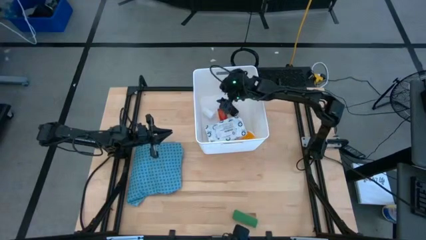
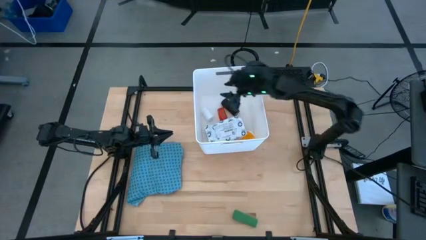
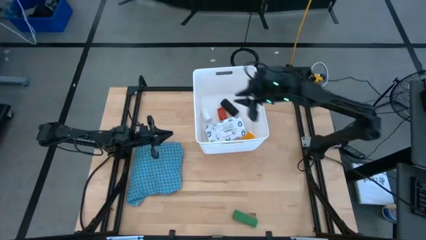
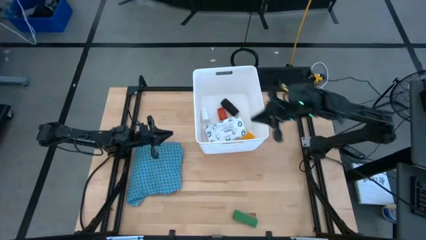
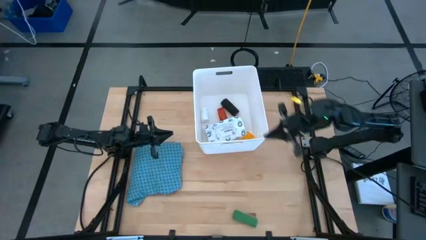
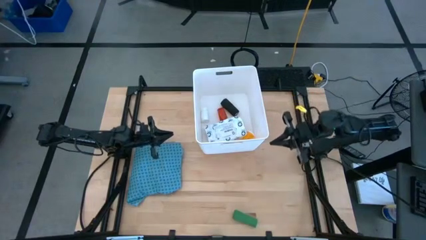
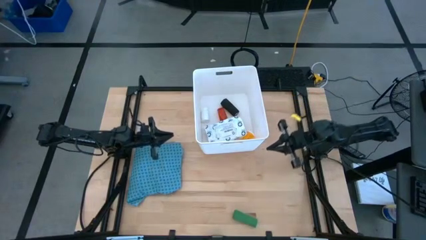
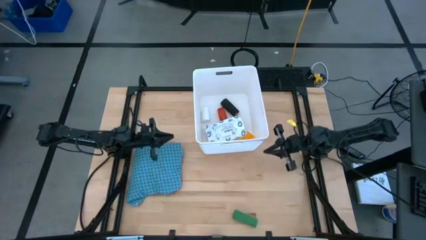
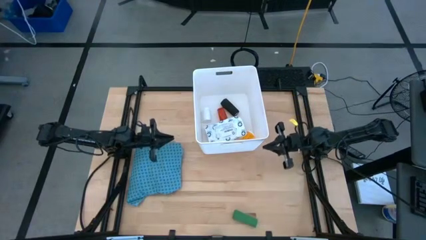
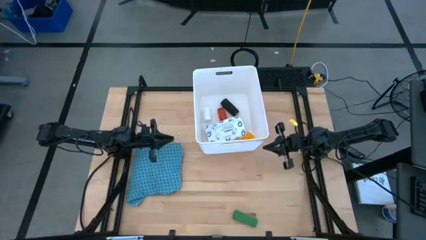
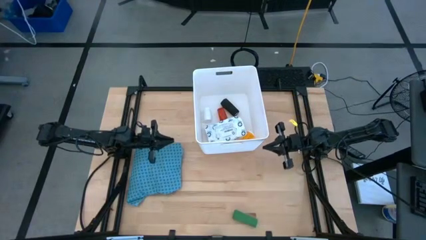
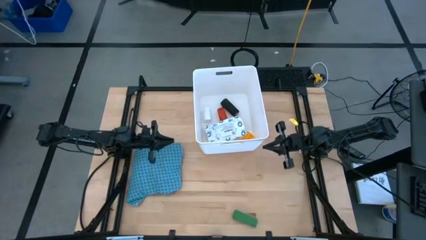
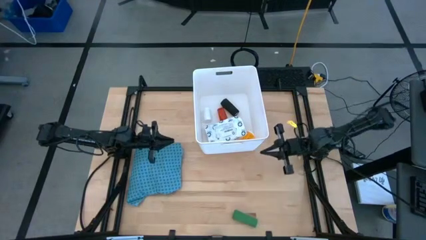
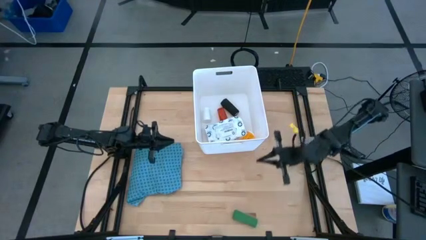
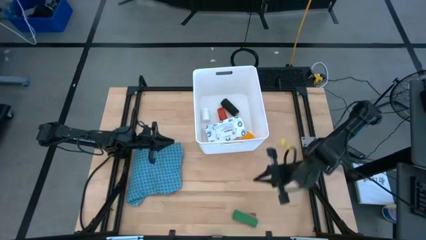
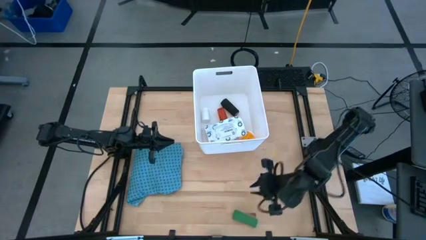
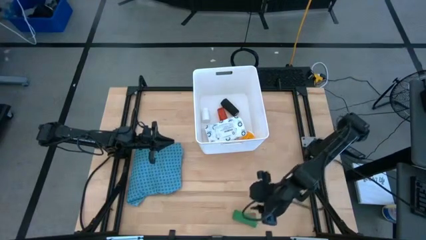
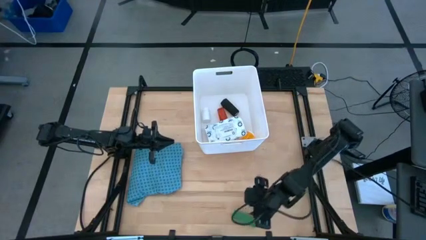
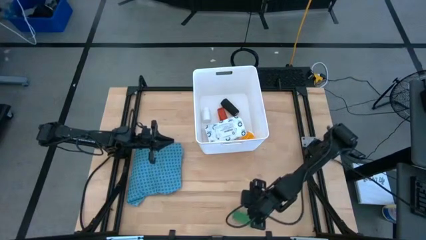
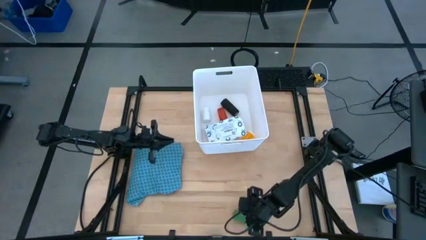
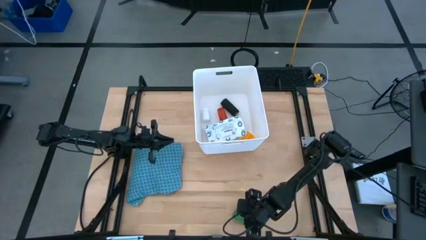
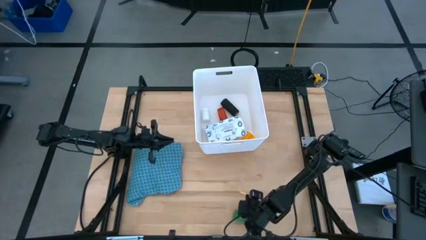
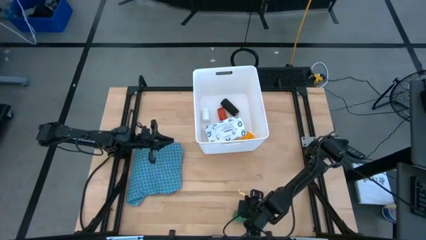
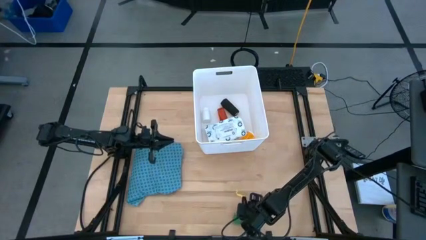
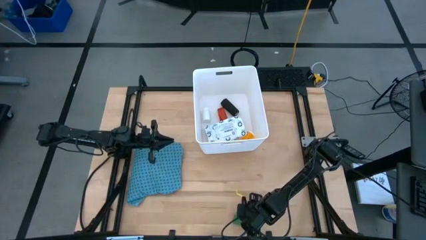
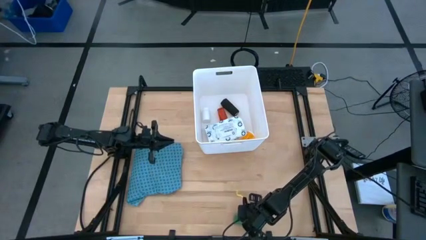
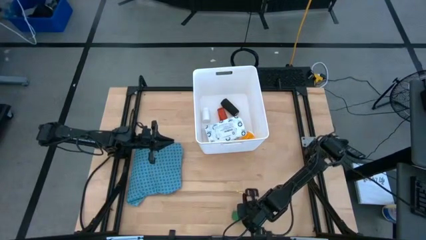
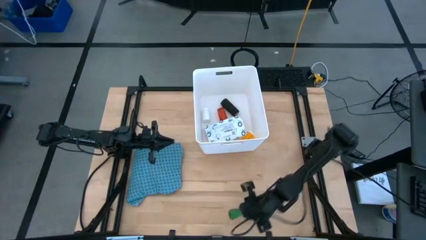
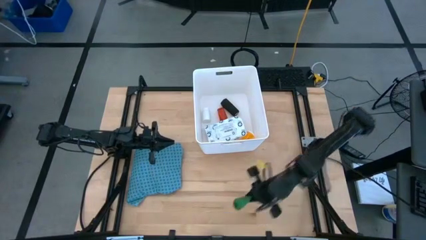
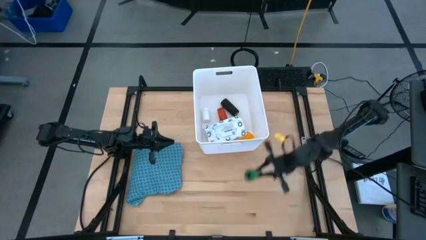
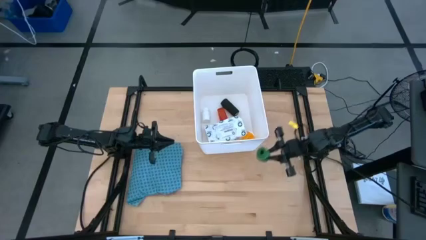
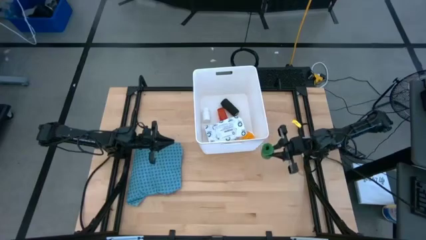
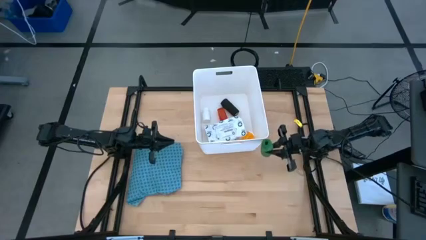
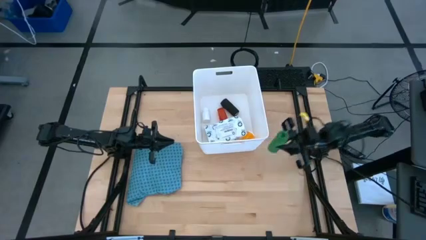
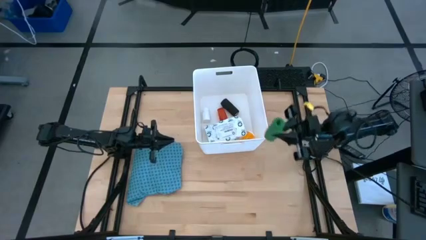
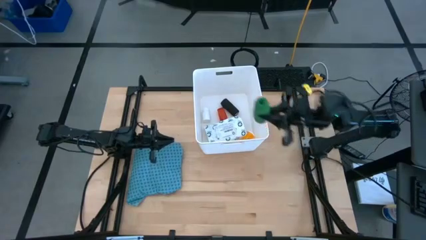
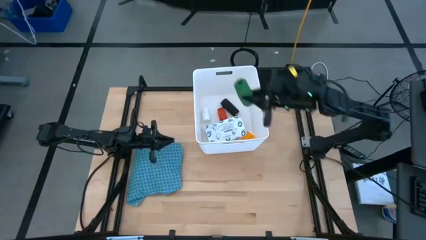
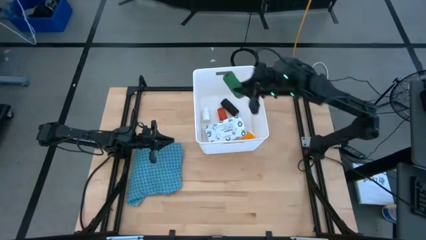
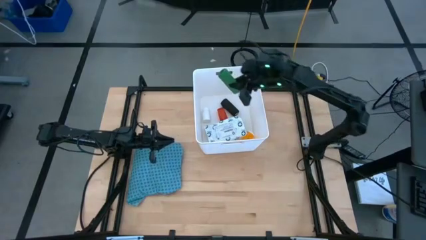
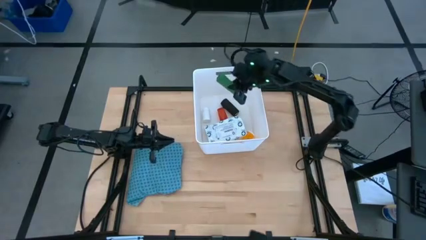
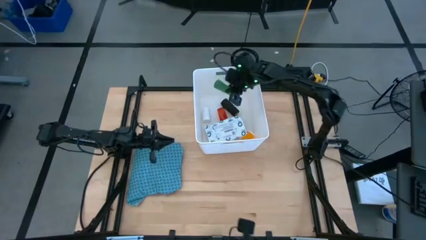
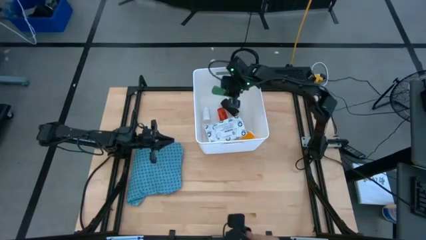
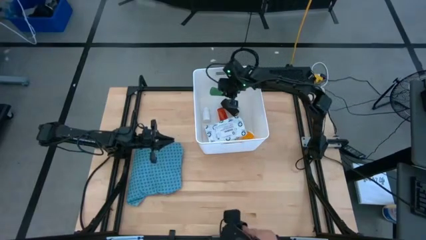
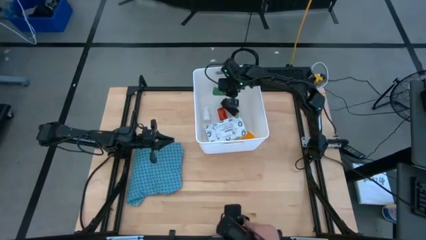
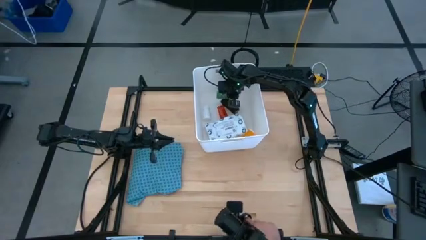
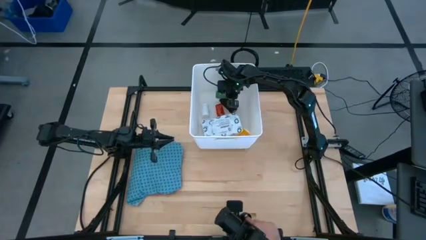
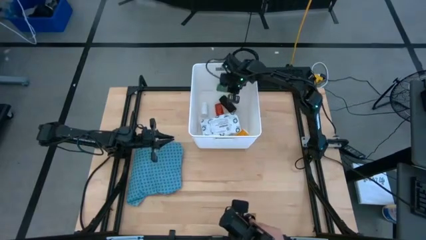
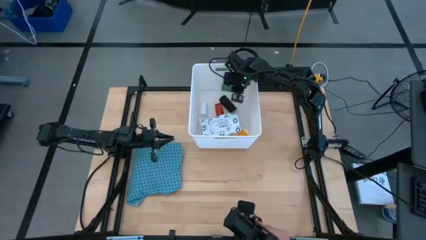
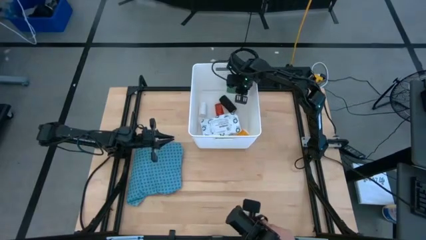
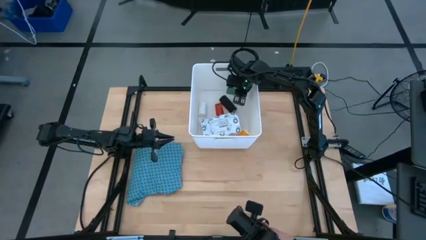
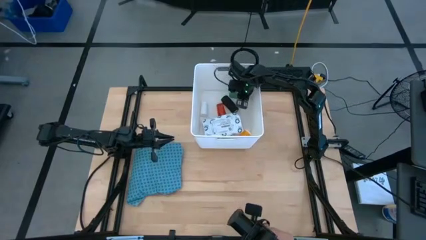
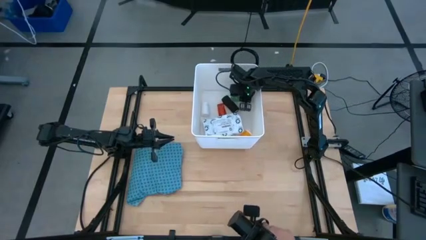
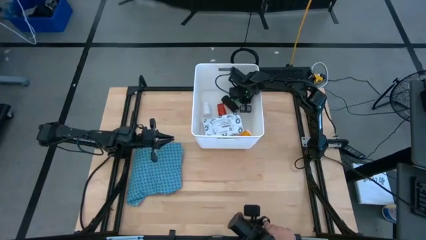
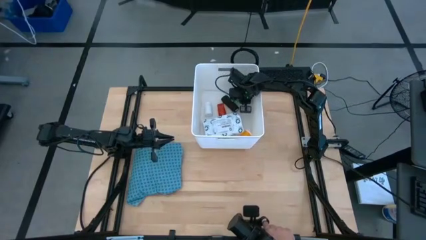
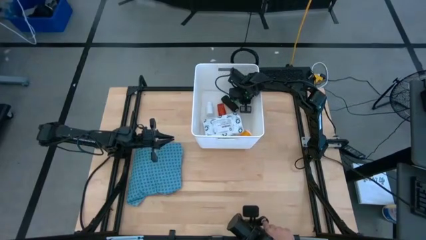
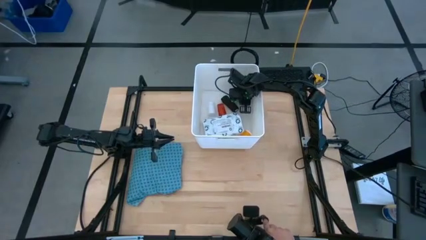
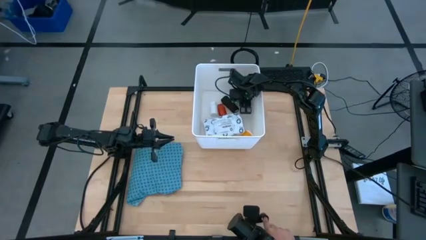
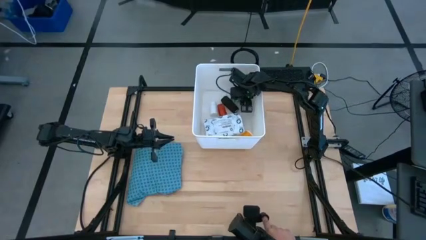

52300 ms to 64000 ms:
Task: Pick & place medical supplies in basket/bin
Put the green bandage in the white basket

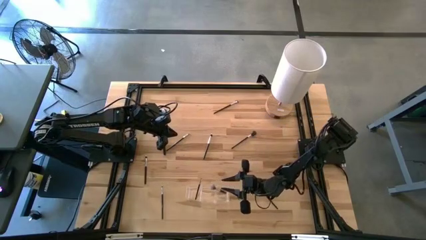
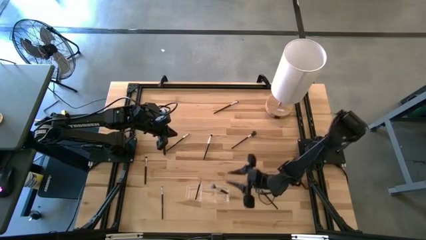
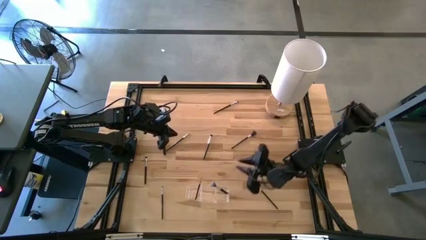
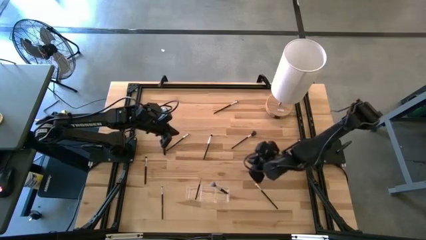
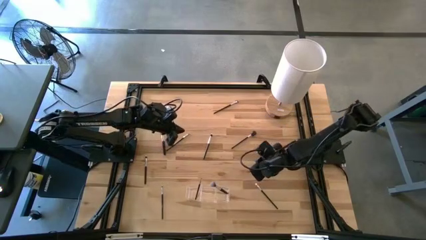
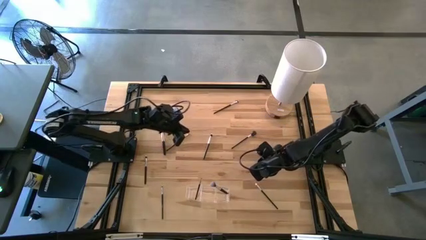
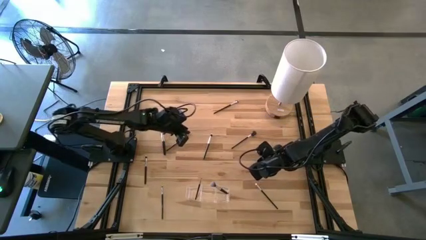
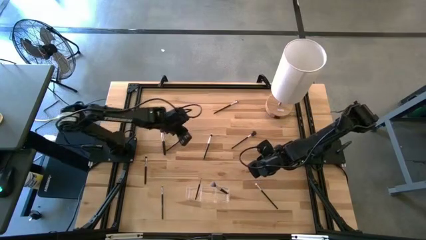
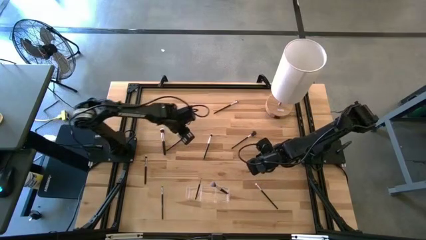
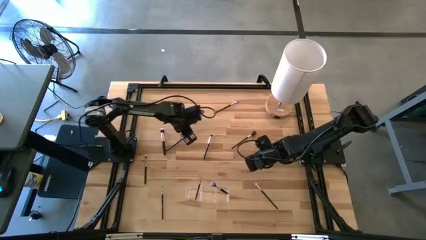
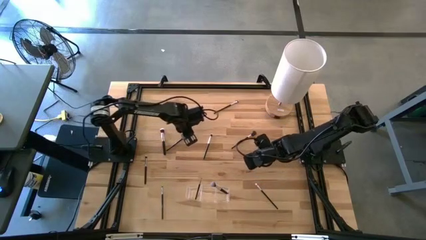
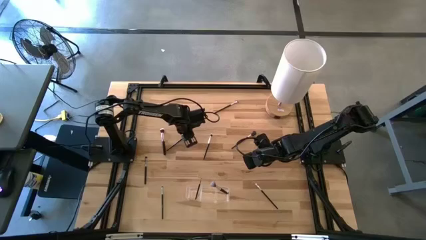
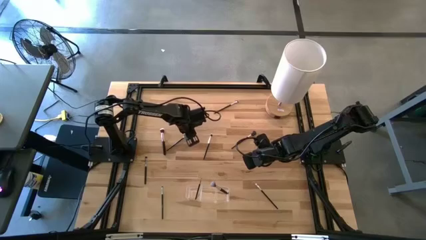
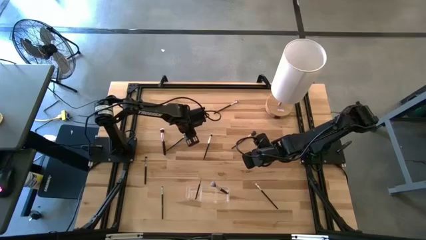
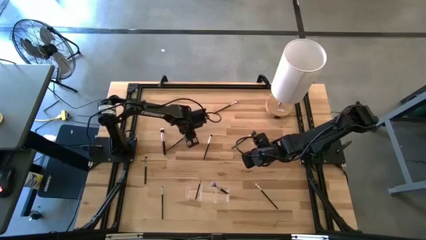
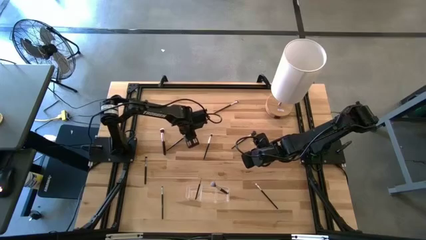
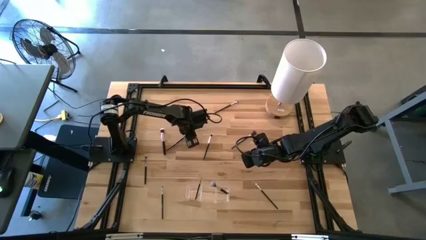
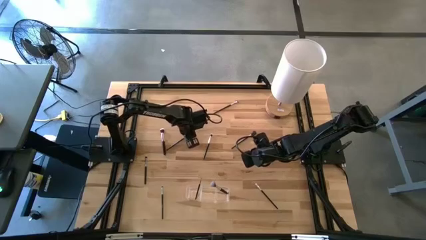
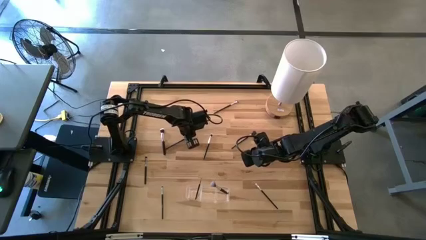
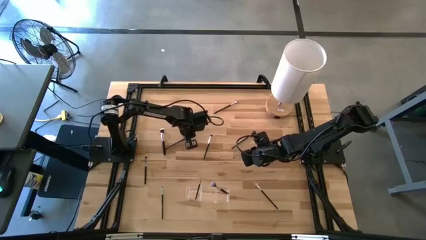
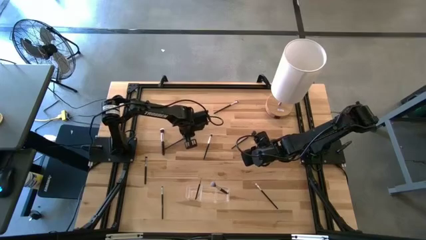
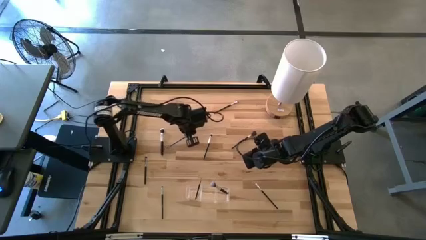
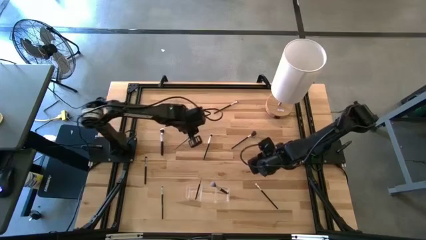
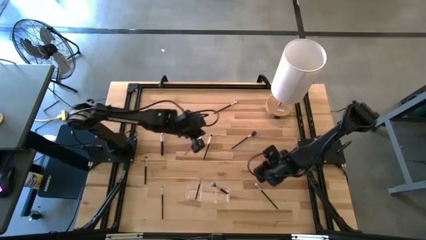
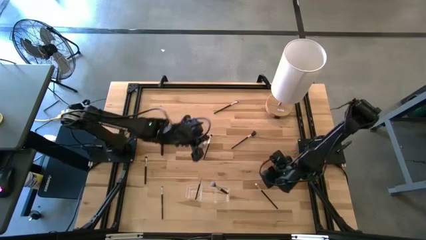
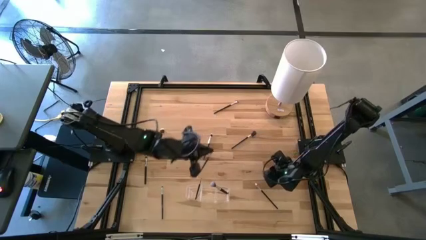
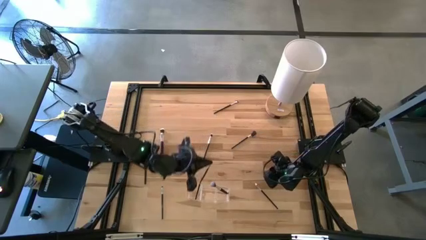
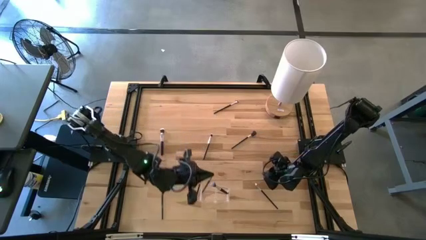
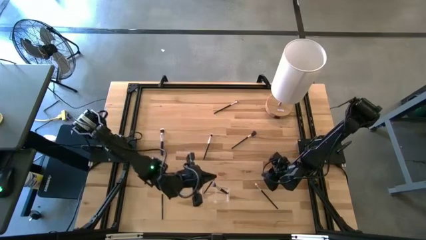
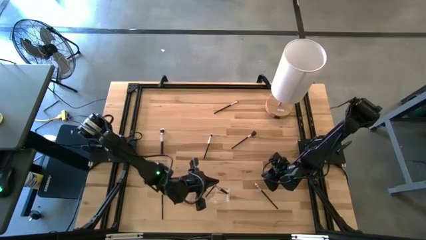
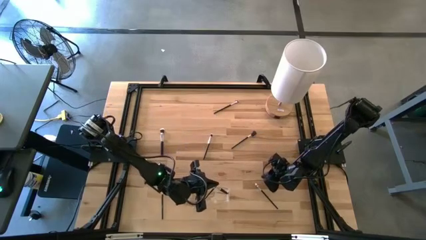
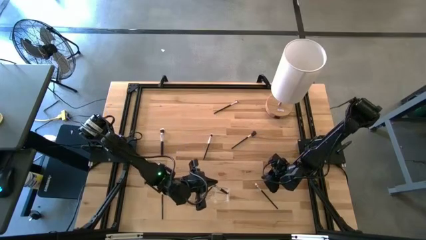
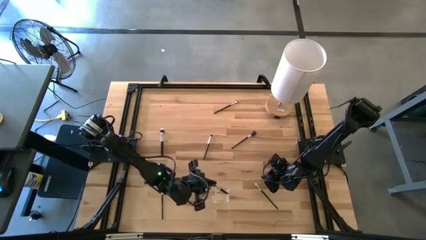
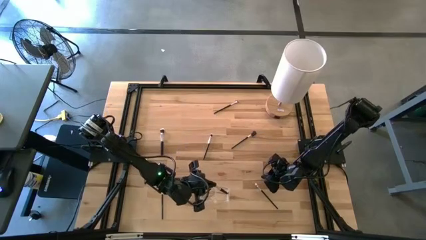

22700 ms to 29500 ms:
Task: Put items in baskets/containers
Put the black eyeshadow brush into the transparent organizer
